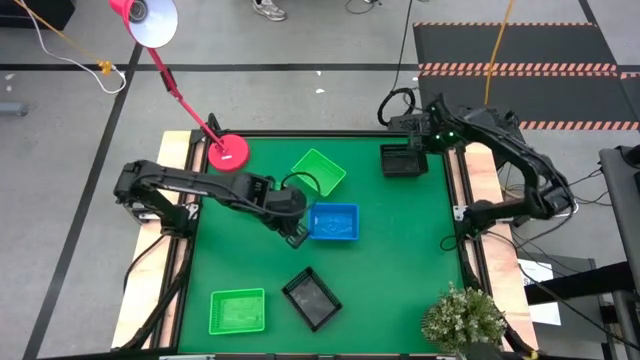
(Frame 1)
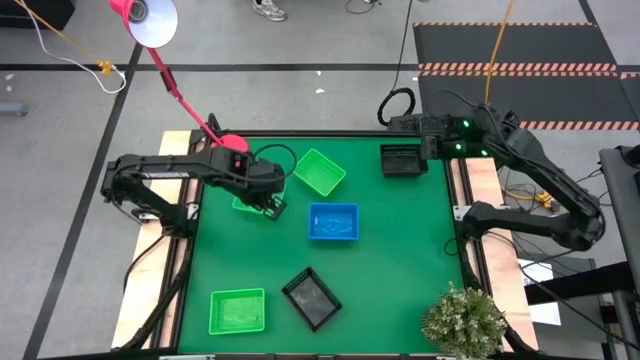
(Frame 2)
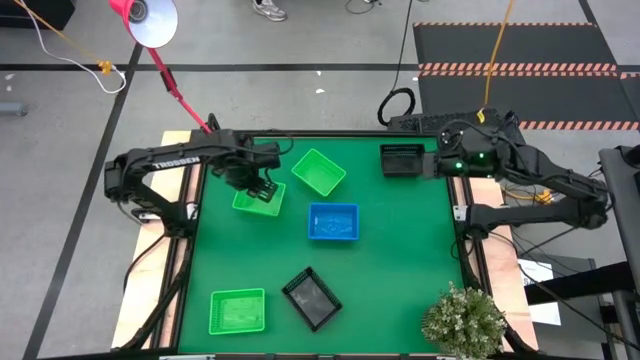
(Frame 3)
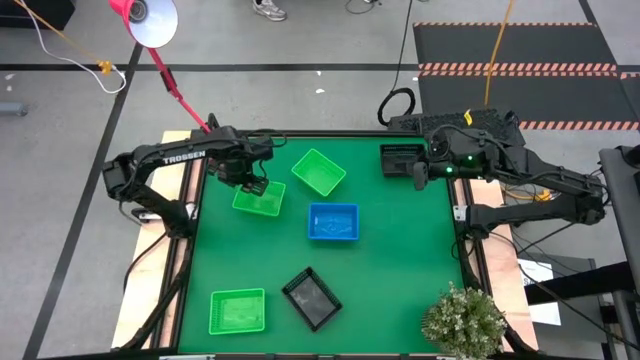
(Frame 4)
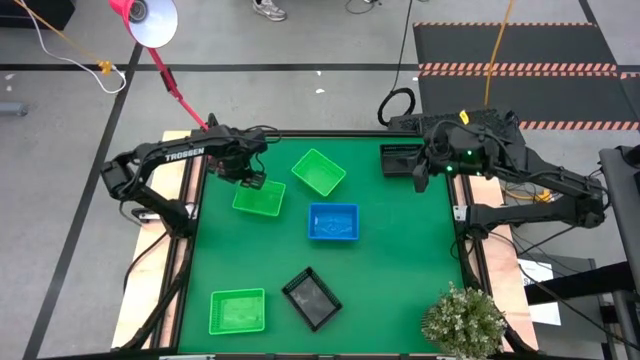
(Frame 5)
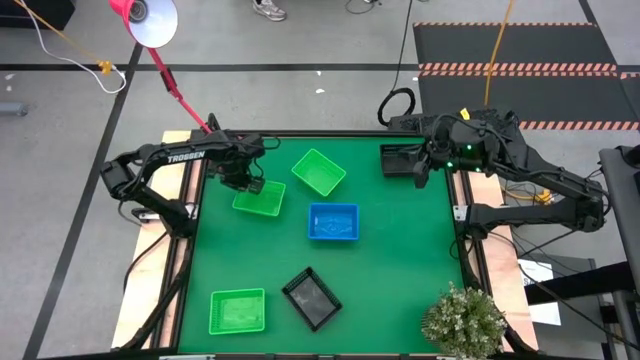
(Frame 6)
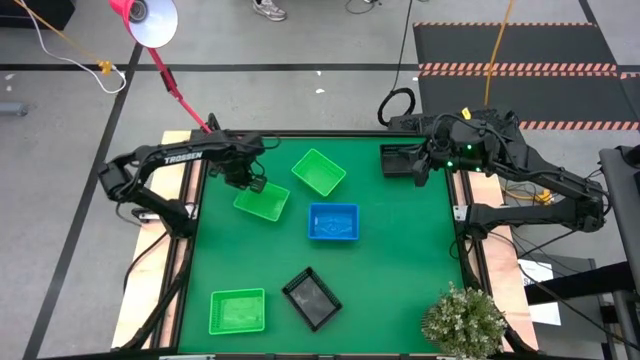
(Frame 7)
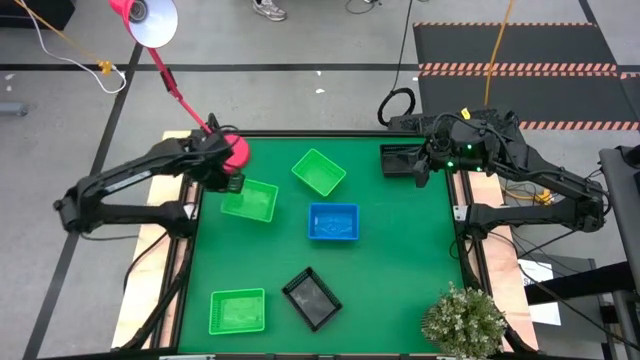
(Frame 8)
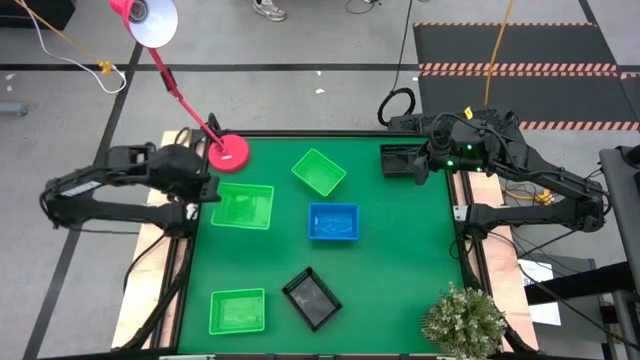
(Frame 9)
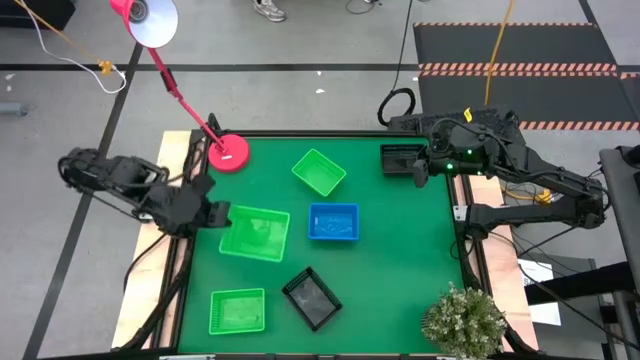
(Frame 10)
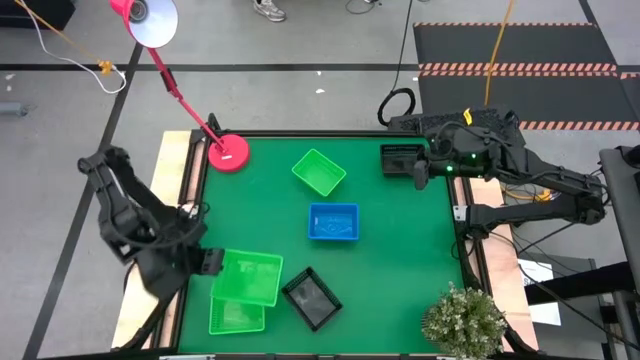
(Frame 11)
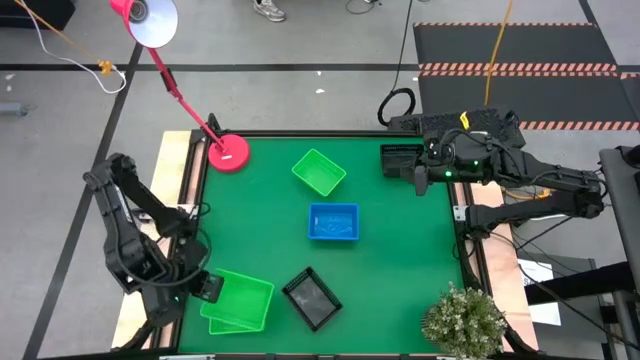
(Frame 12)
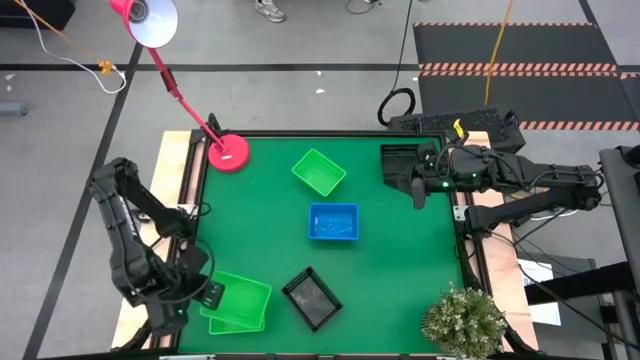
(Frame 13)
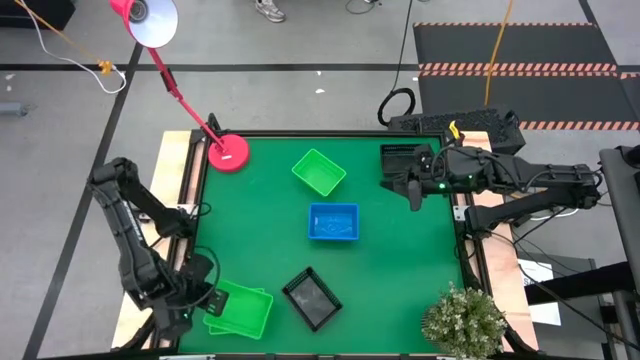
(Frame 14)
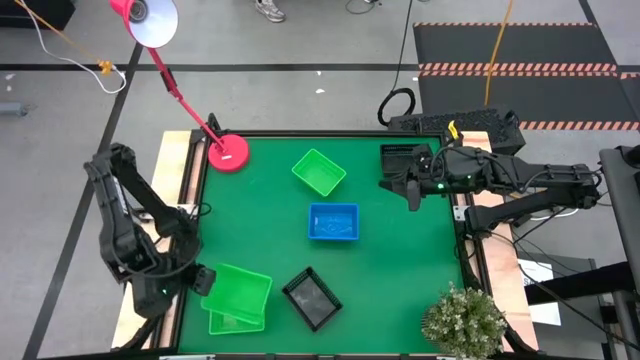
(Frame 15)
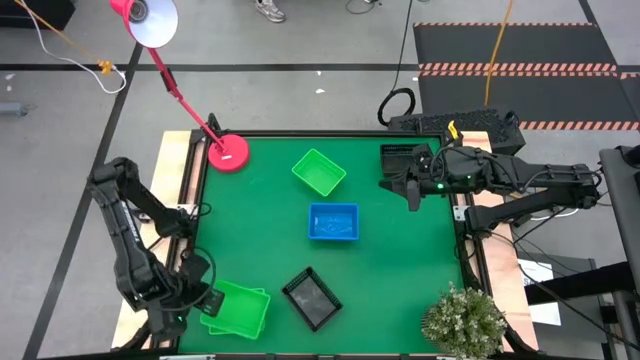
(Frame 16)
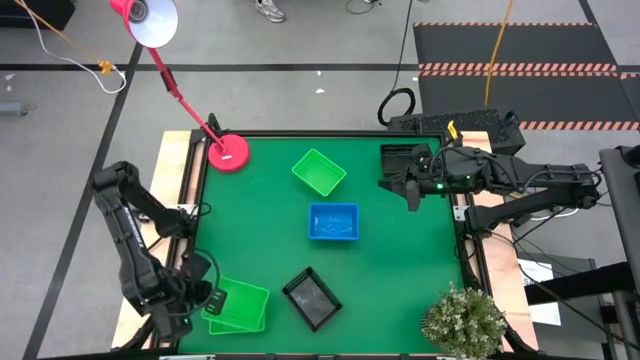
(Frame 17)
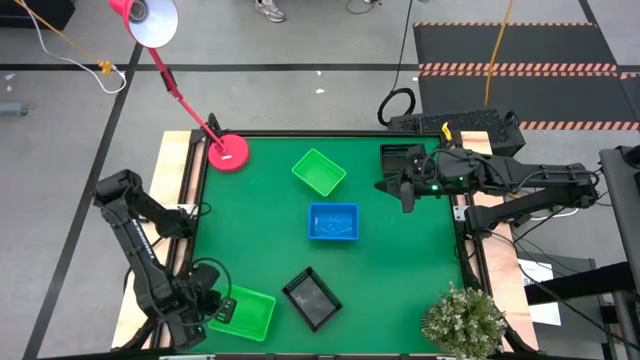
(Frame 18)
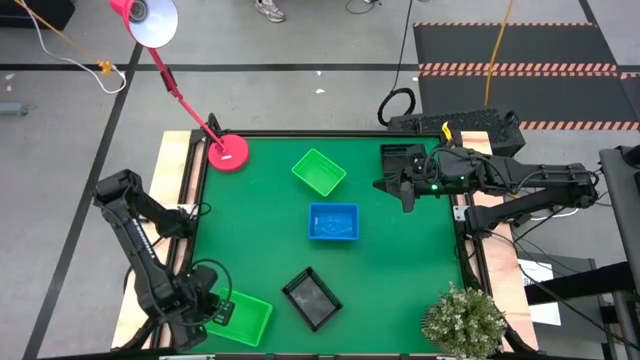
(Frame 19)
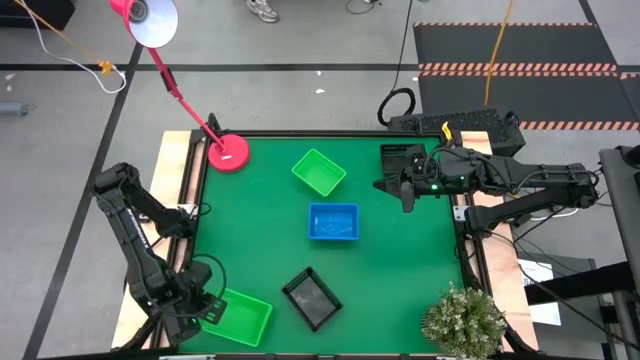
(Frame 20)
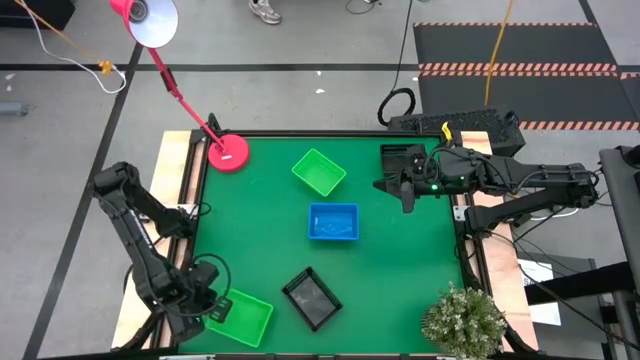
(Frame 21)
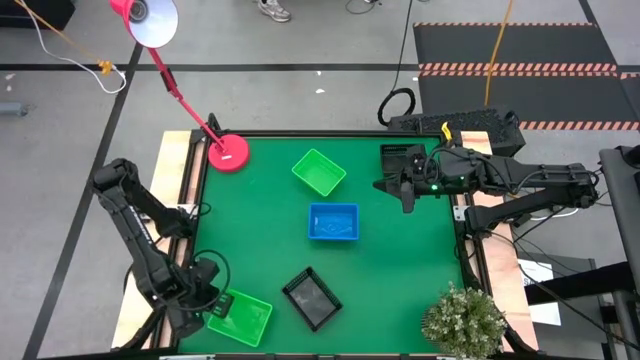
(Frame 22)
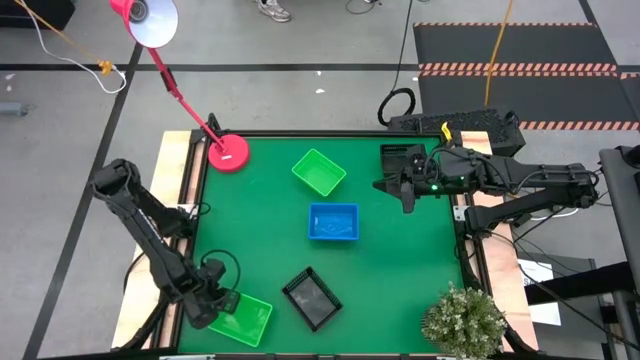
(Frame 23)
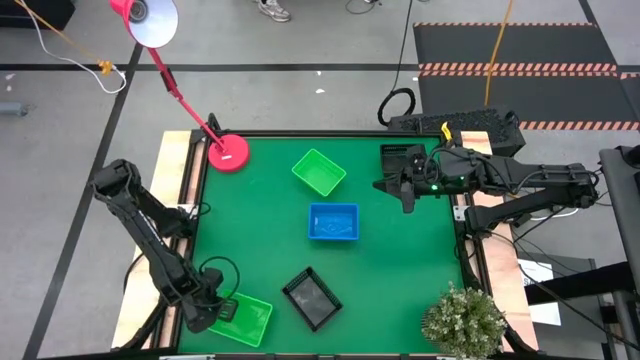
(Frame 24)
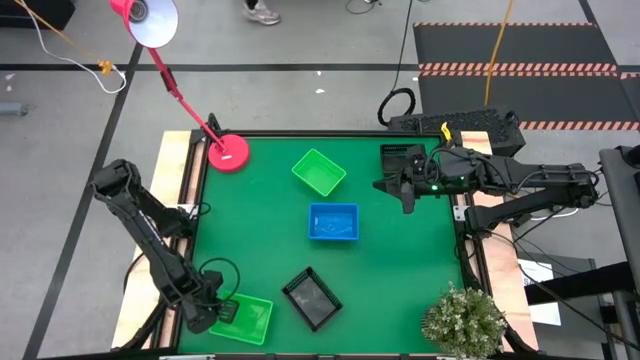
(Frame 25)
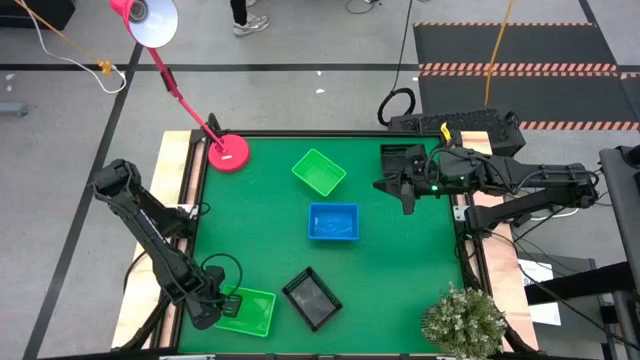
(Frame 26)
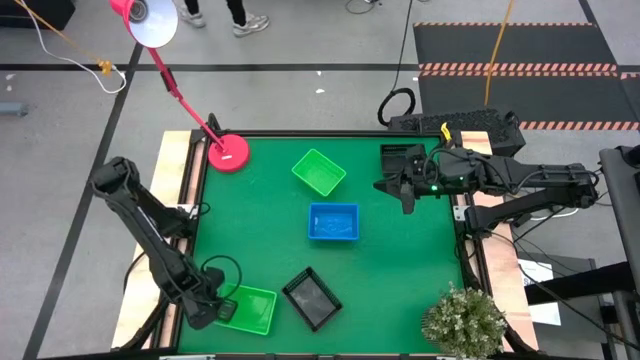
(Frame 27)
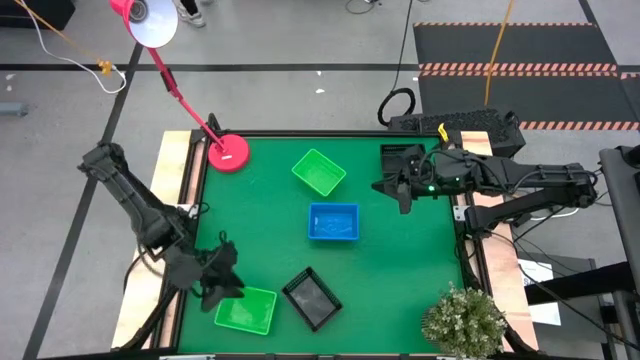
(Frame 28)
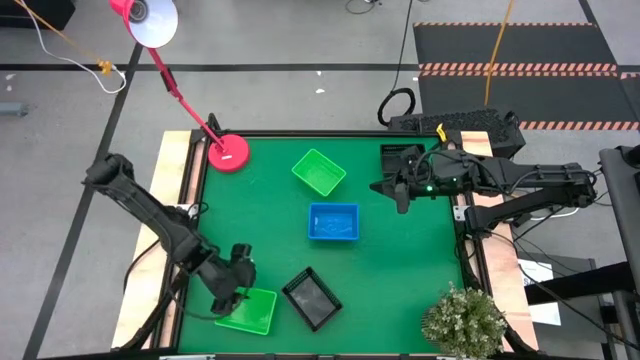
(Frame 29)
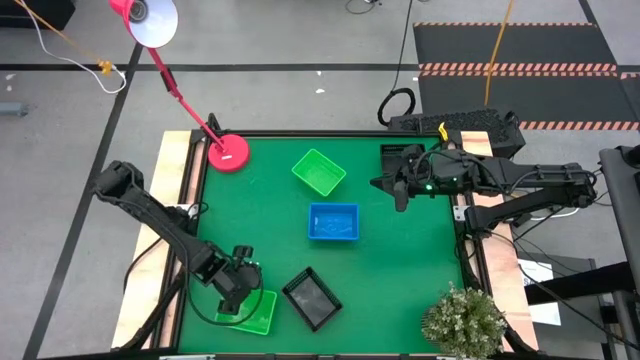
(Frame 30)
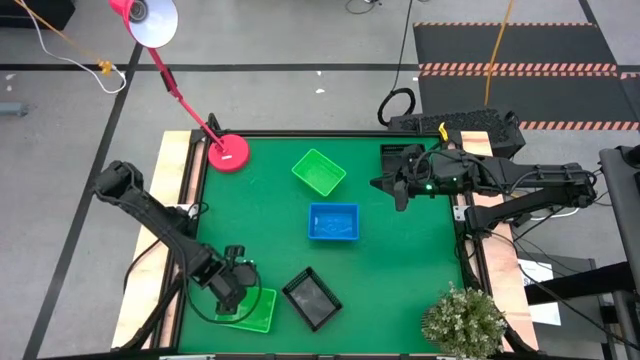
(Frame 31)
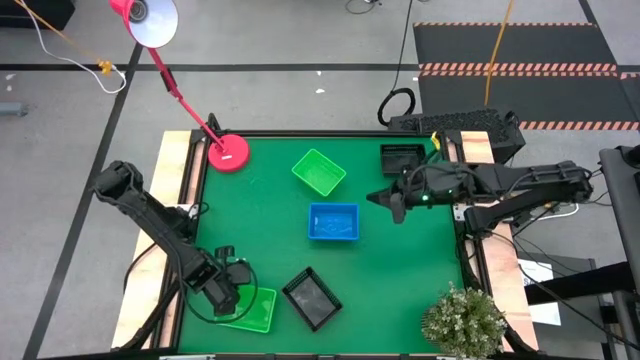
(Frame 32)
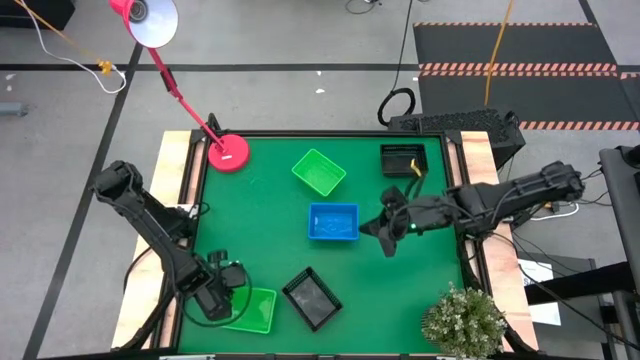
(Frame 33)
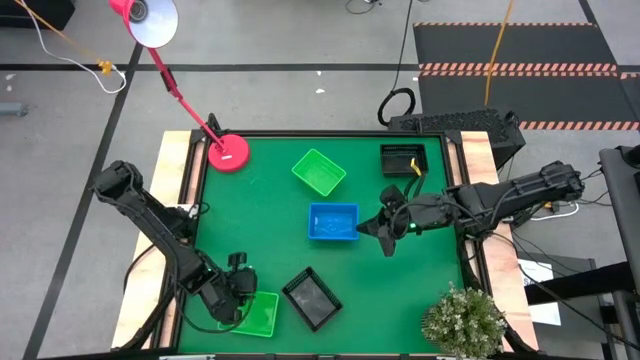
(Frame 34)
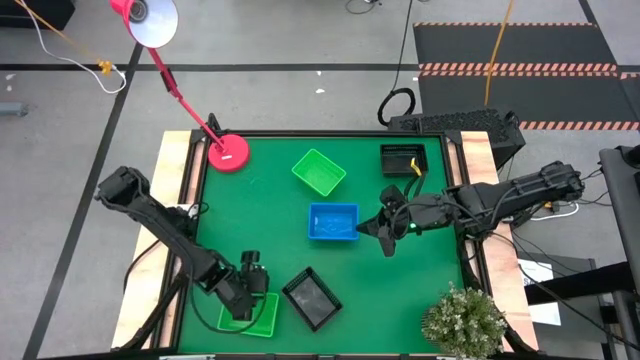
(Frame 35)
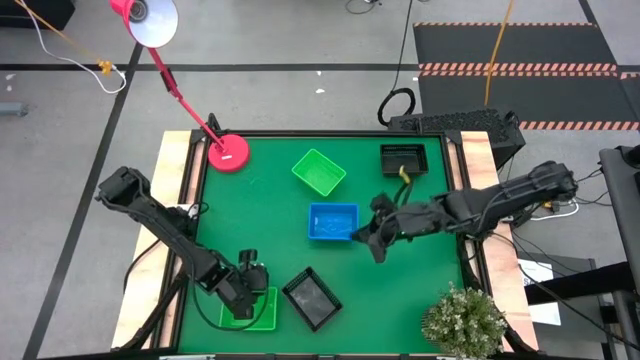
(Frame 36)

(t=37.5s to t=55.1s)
Stack the middle green bin on the bottom green bin

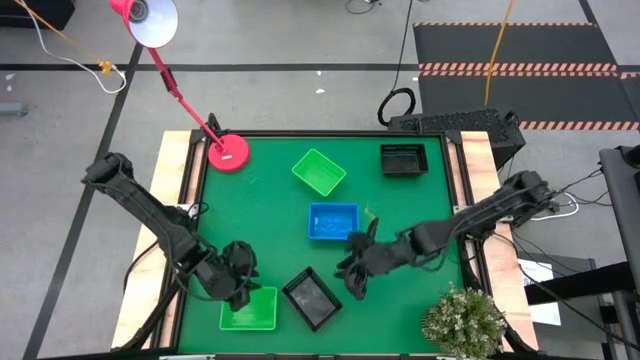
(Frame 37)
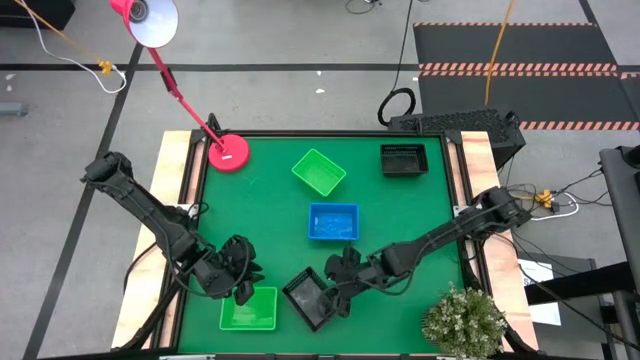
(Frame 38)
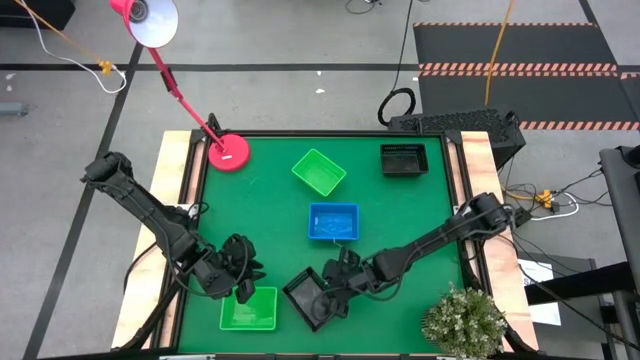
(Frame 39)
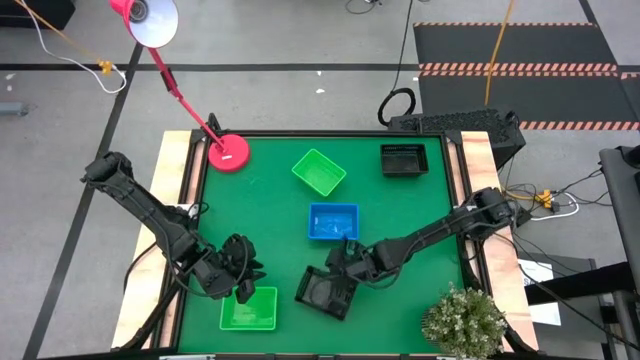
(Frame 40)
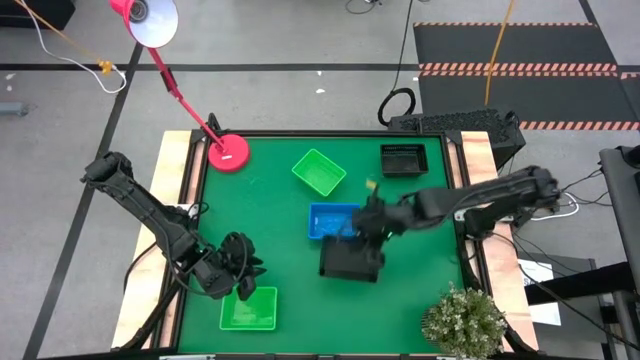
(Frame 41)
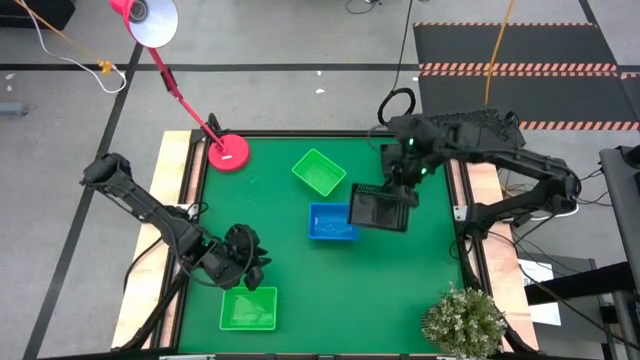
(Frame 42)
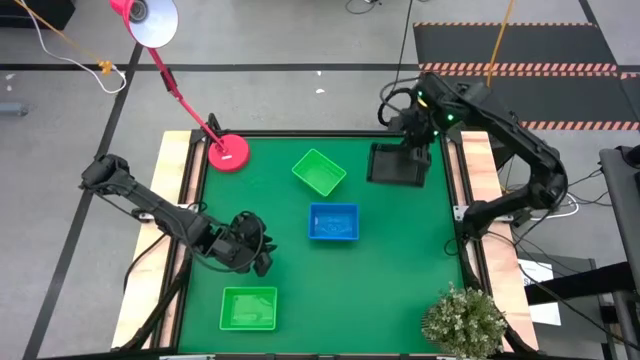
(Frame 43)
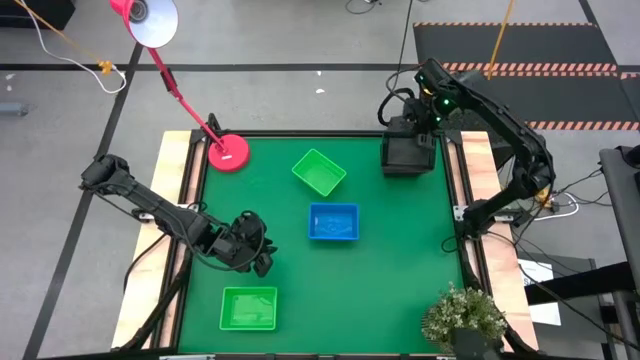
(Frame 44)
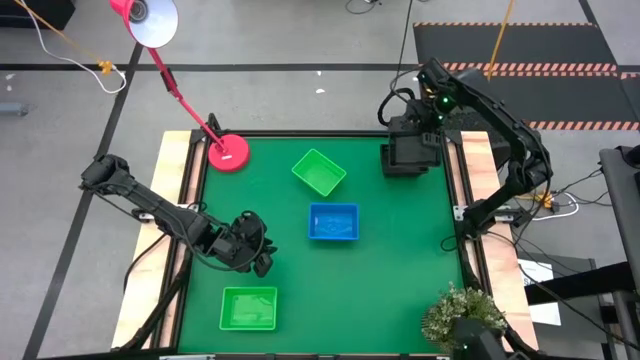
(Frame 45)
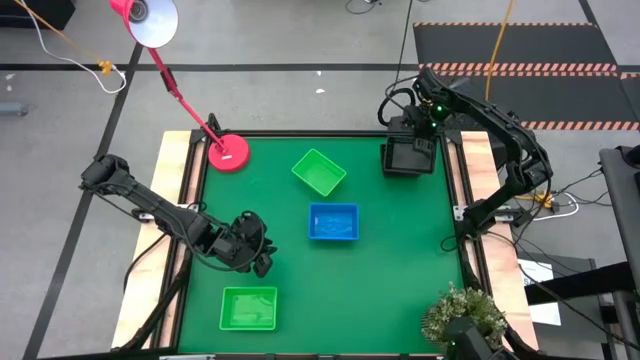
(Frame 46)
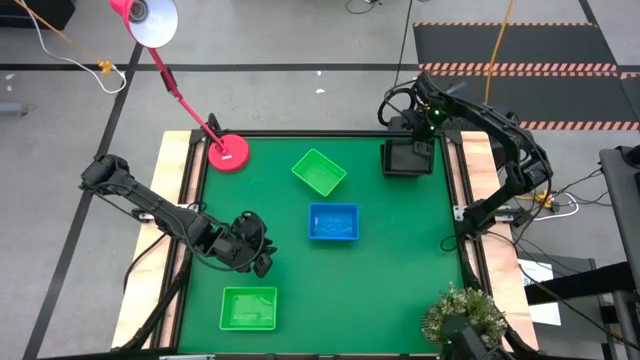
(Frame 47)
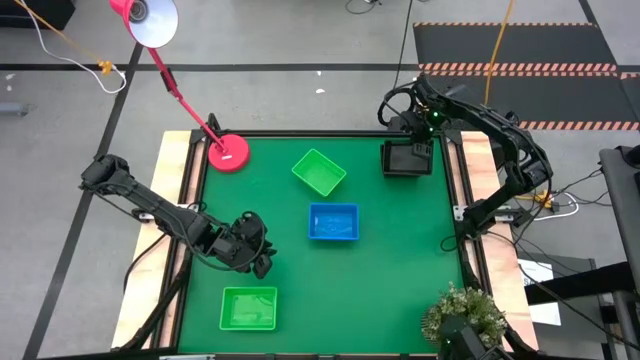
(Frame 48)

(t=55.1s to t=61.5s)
Stack the bottom black bin on the black bins
